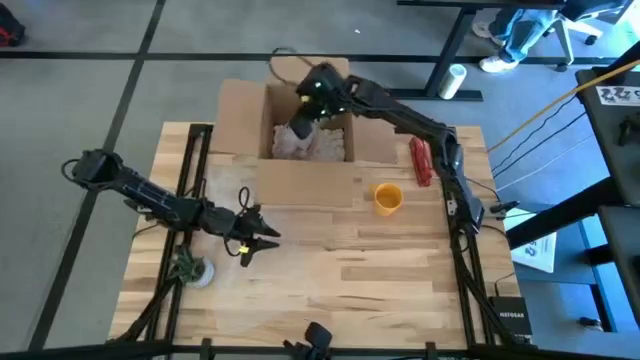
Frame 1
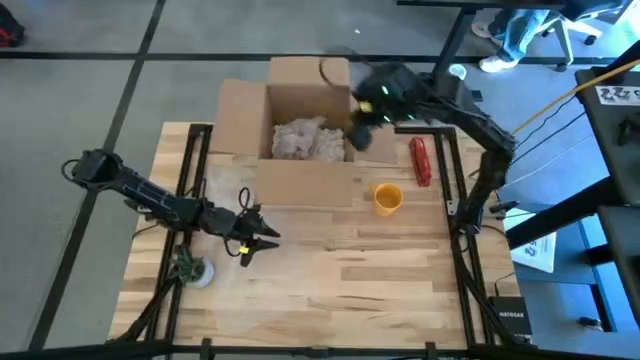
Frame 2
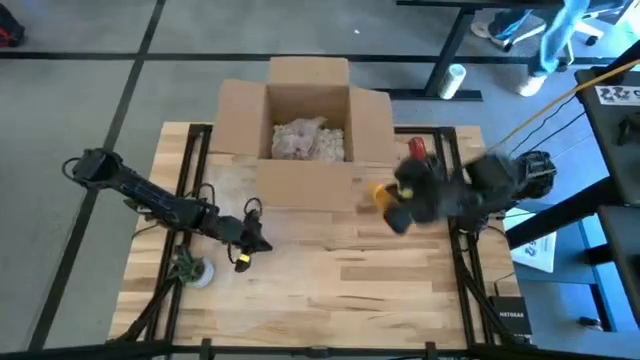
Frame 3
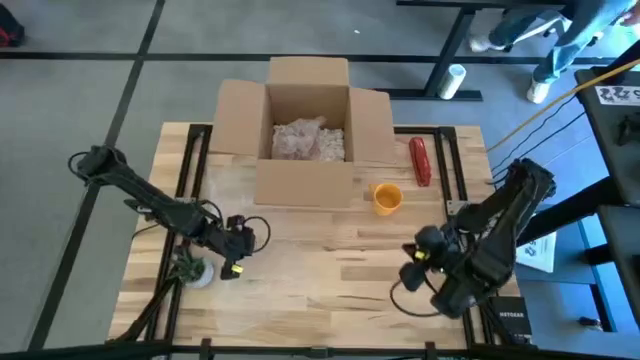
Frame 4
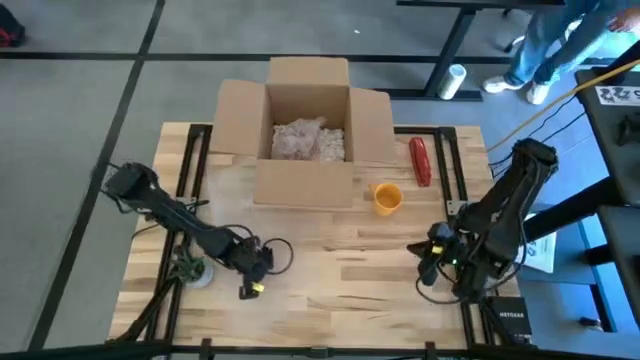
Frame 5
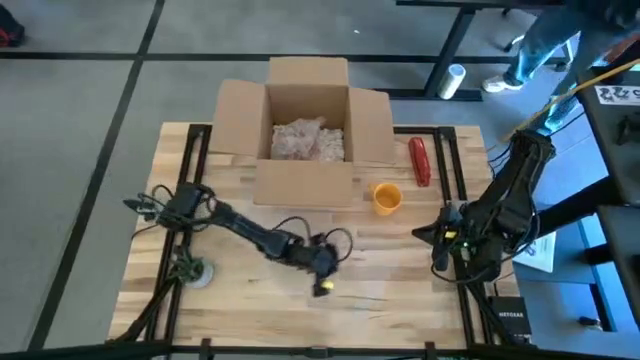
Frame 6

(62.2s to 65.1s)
Task: wrap mug
Adjust the bubble wrap

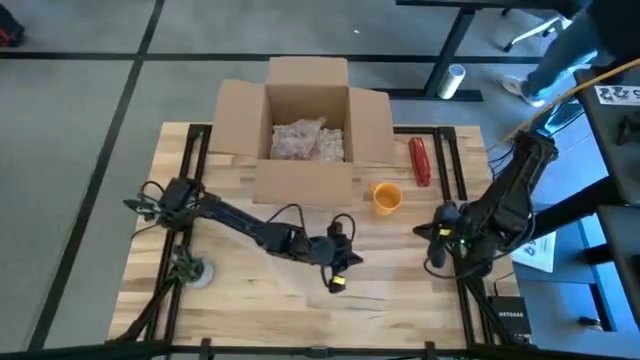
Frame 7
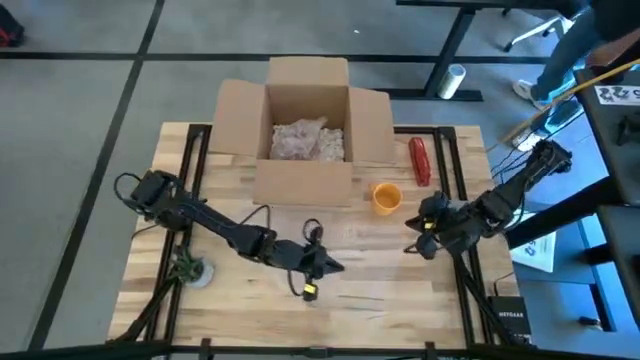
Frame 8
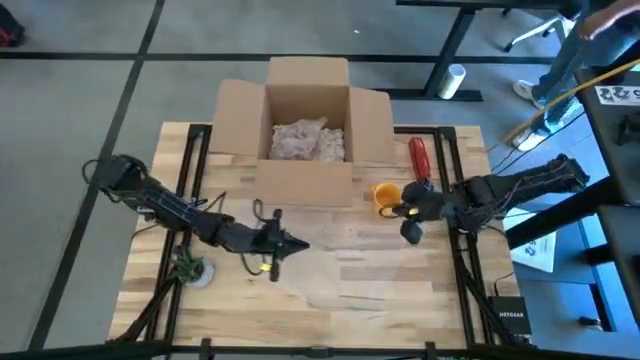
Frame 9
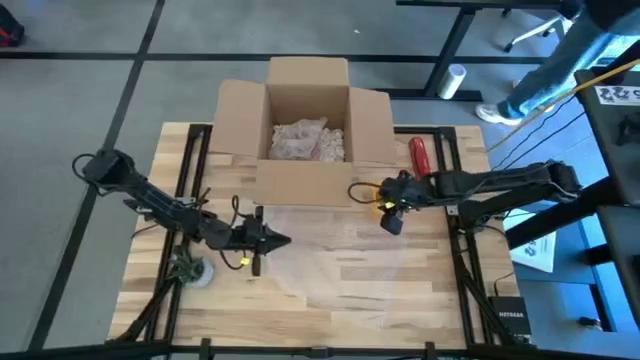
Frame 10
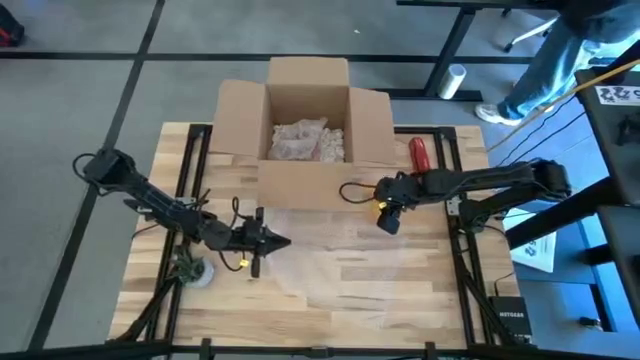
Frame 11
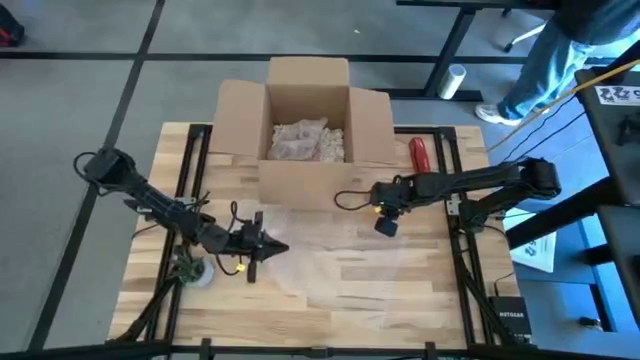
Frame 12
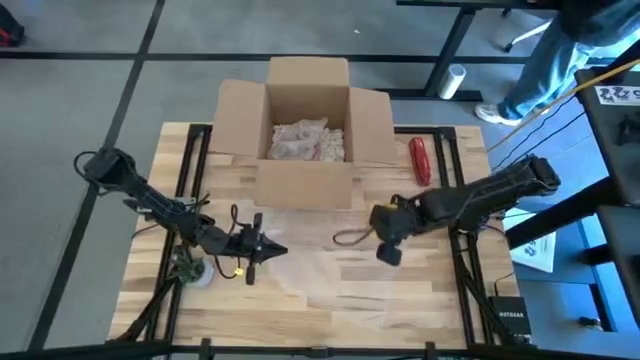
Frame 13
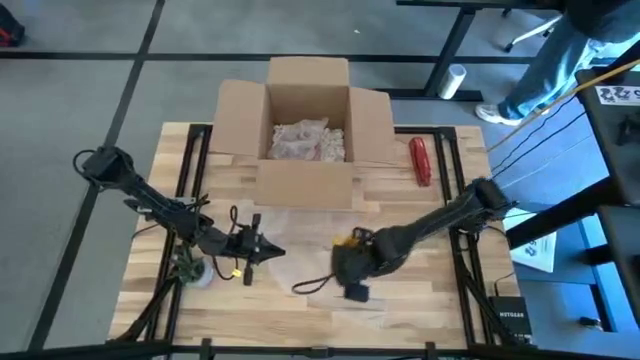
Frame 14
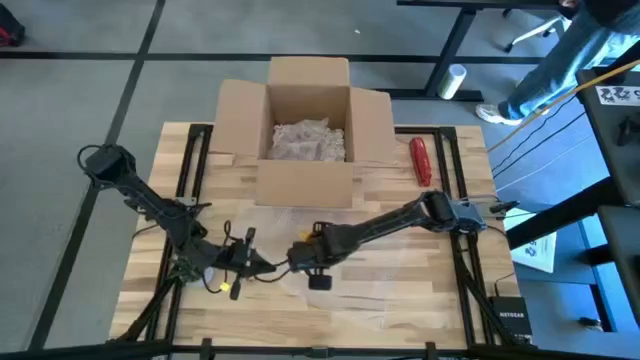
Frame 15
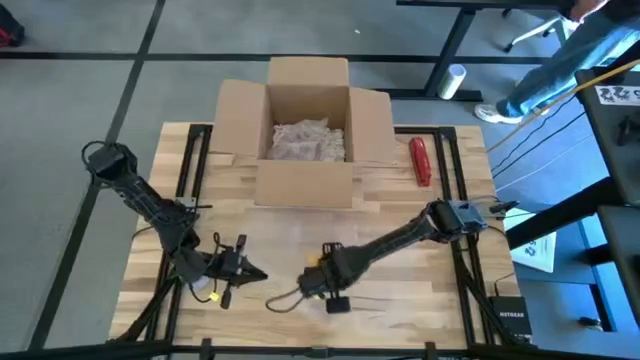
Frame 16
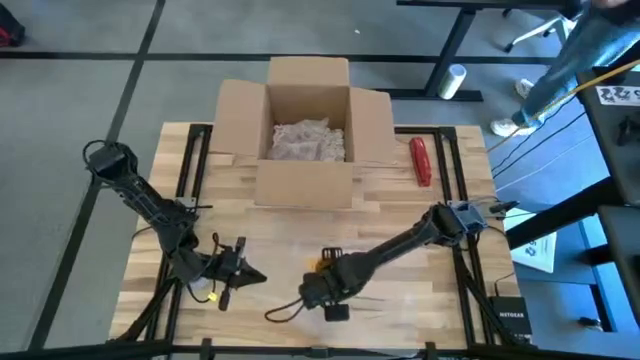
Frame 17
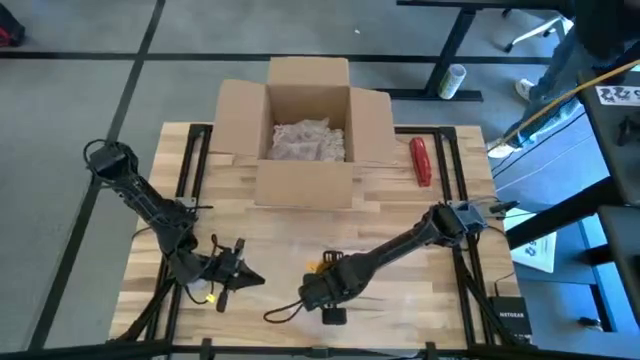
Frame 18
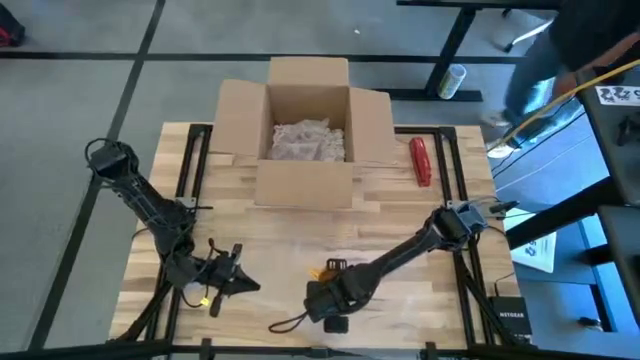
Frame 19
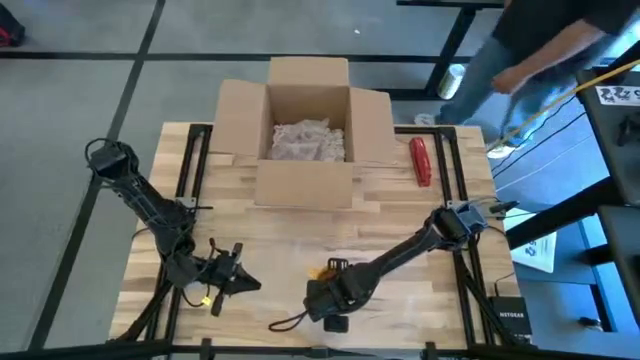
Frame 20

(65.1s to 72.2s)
Put the yellow mug on the bubble wrap

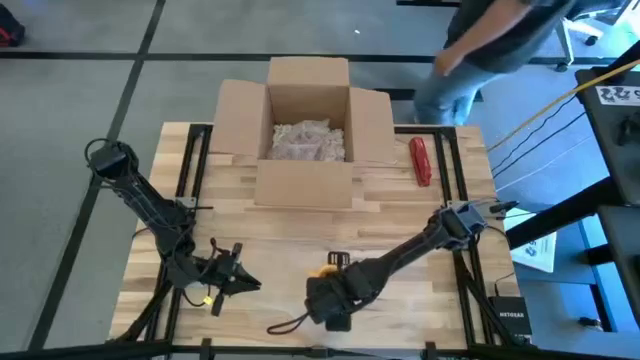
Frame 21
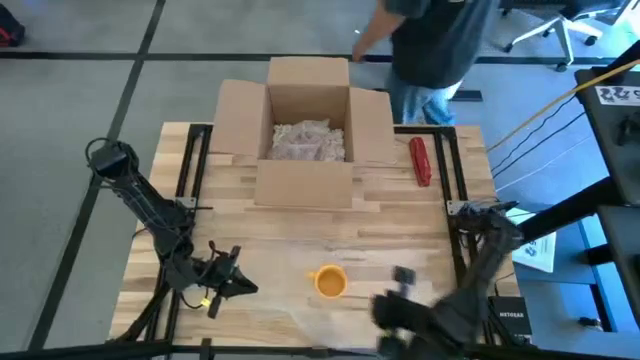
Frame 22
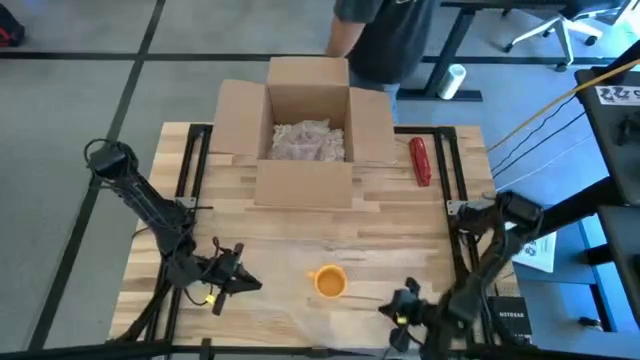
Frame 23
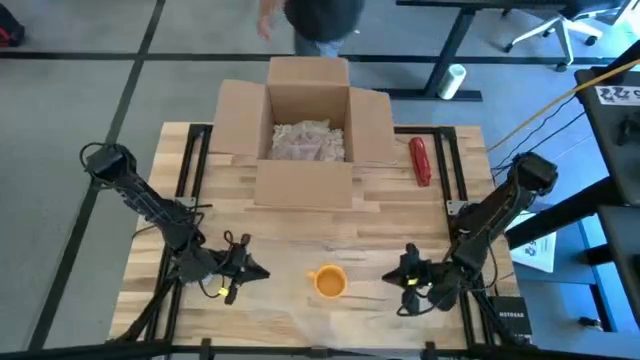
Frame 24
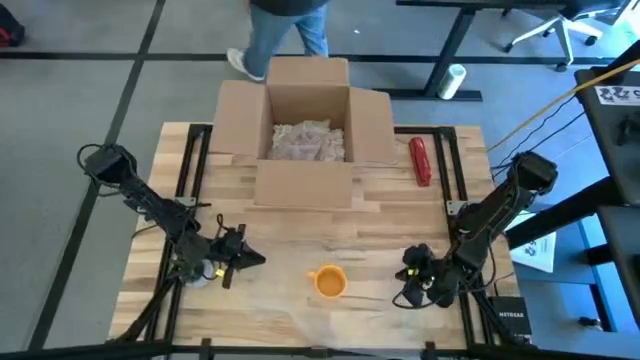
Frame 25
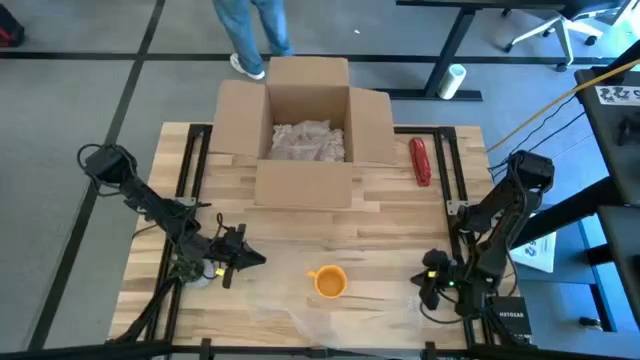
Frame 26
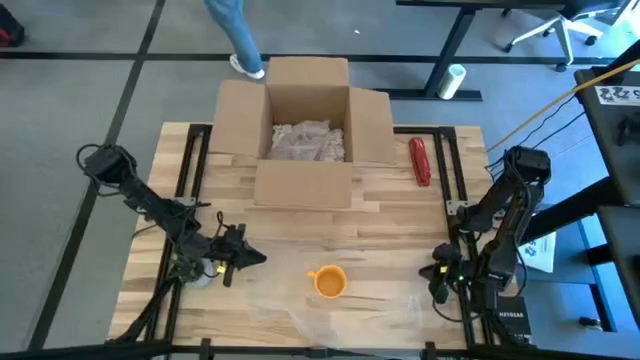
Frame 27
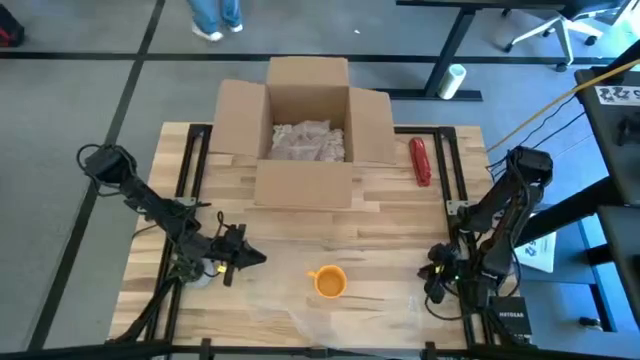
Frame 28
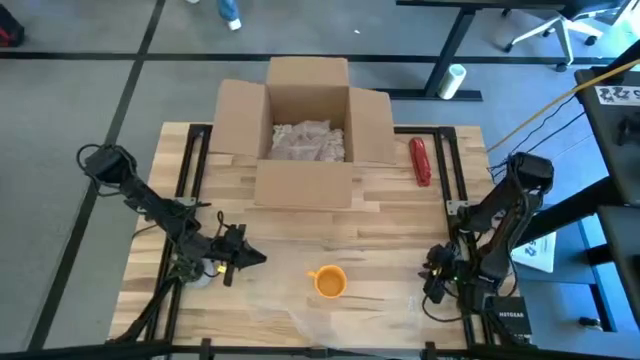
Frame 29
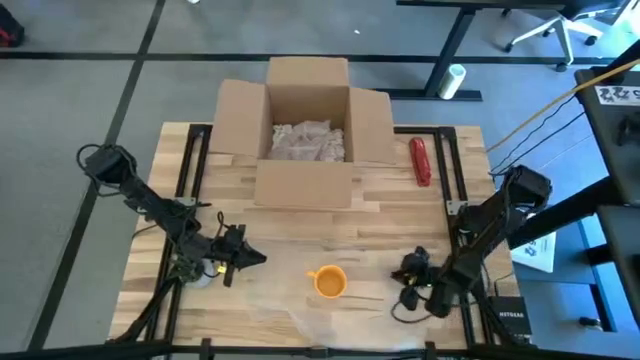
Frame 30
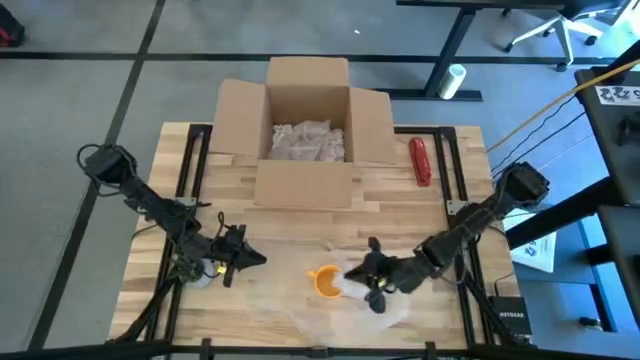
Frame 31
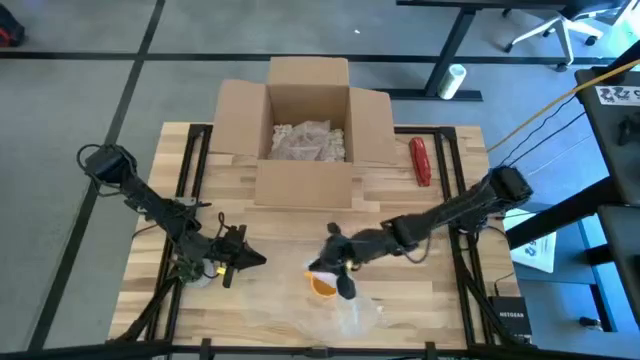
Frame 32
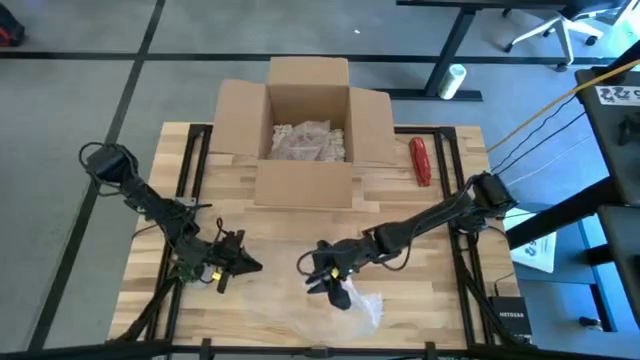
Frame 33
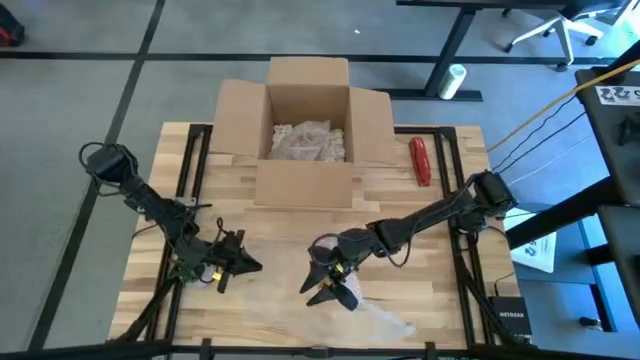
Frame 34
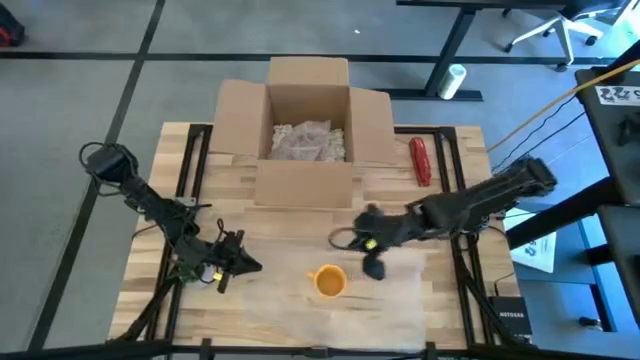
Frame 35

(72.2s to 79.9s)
Wrap the yellow mug with bubble wrap

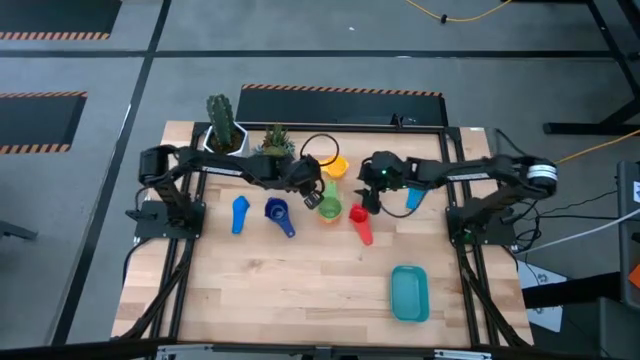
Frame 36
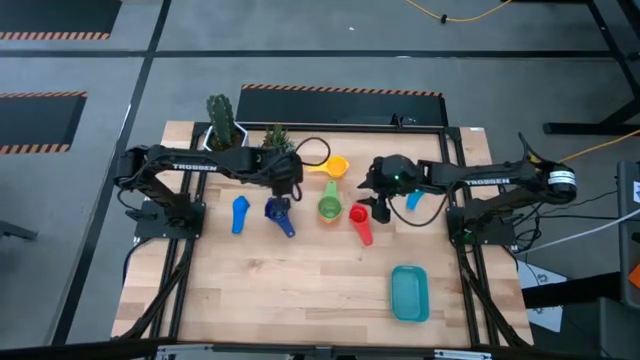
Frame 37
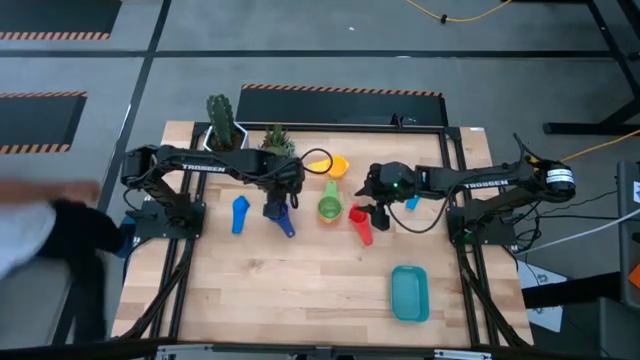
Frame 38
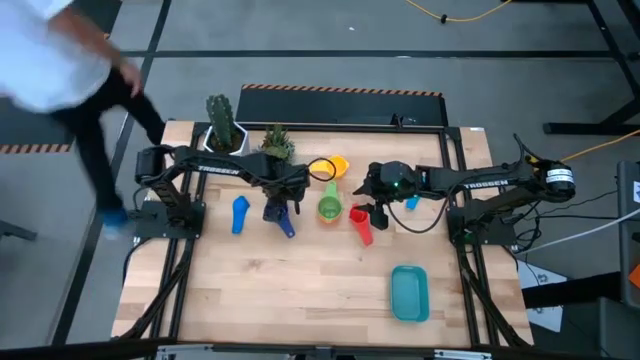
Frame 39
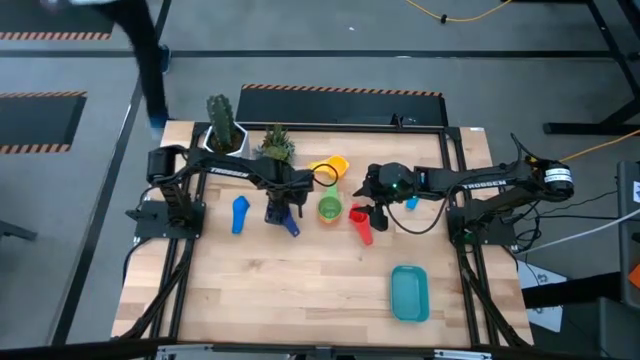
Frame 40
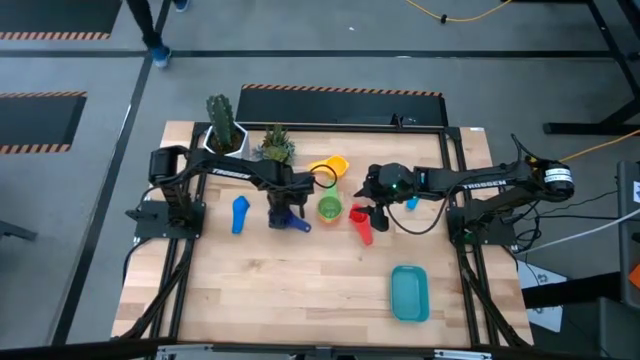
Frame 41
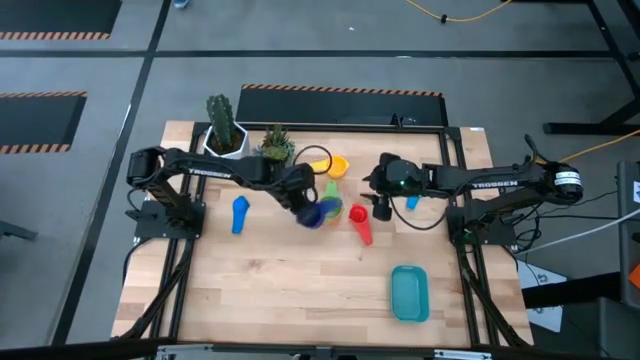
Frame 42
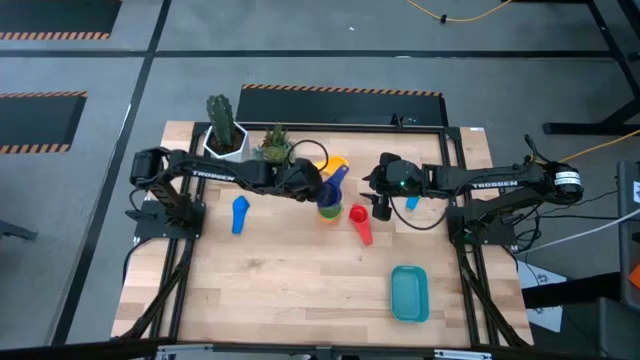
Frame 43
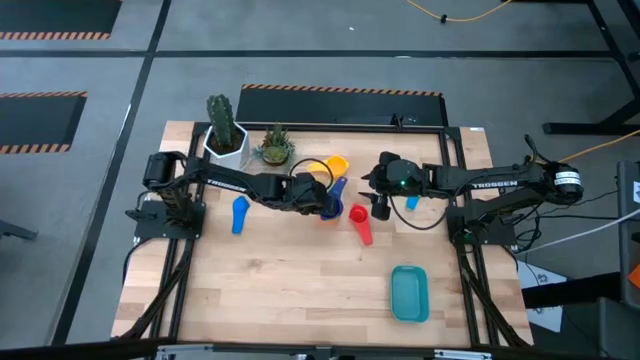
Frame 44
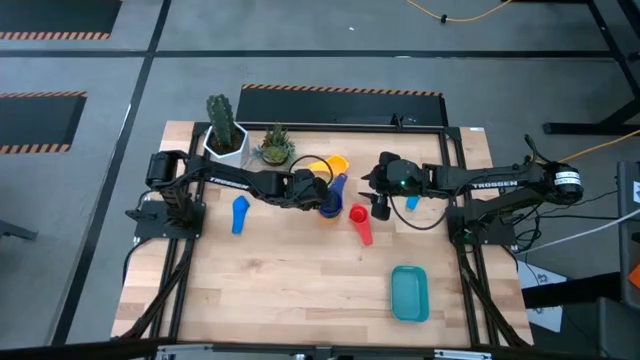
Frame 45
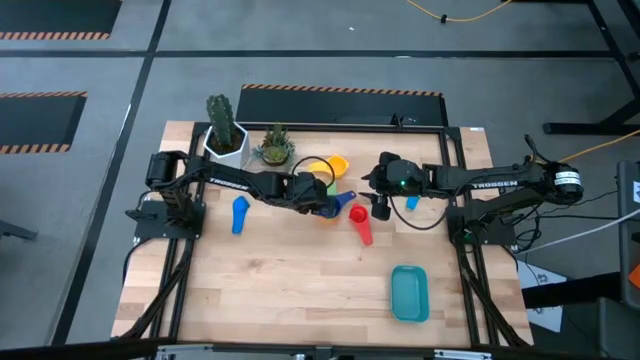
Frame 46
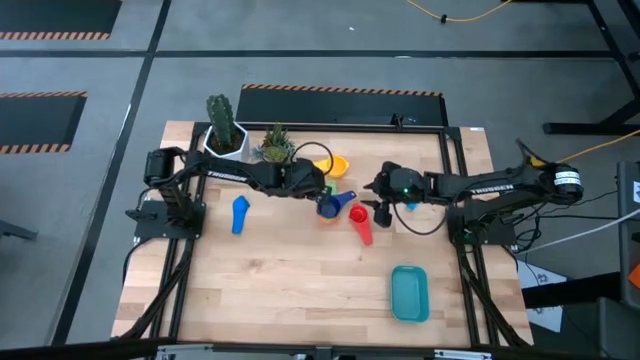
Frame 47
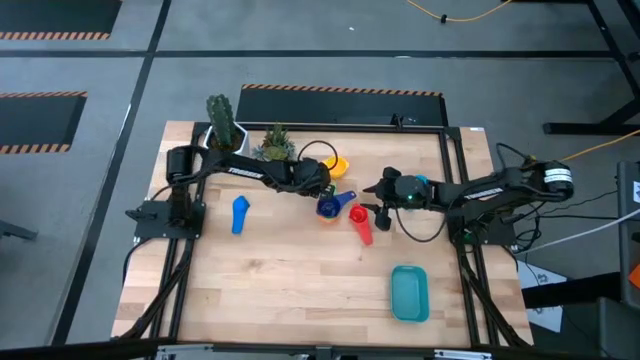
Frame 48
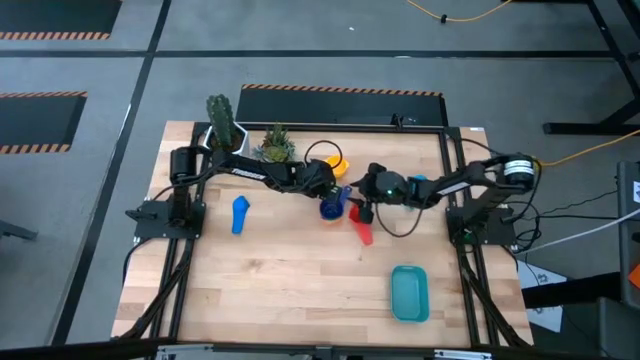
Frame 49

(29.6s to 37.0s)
Task: Nest measuring cups in basket
Stack the dark blue measuring cup on top of the green measuring cup
